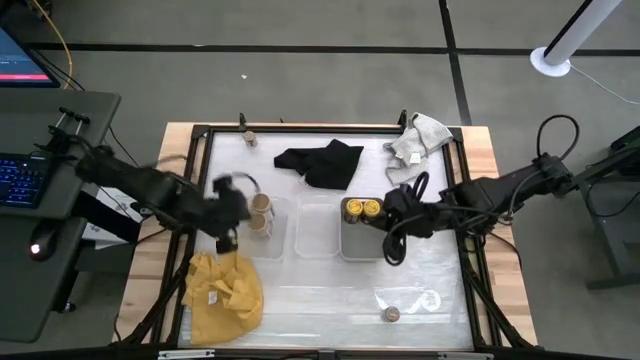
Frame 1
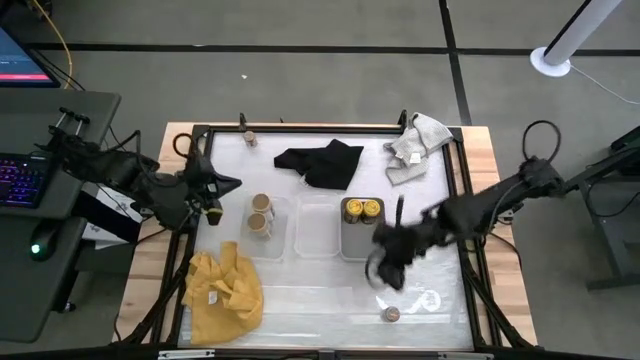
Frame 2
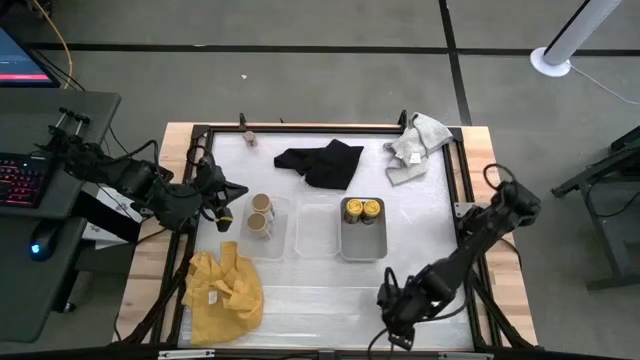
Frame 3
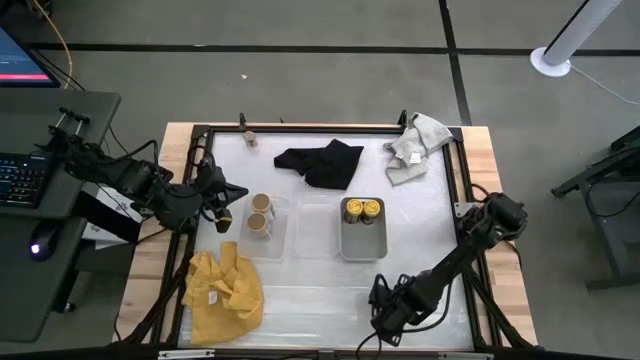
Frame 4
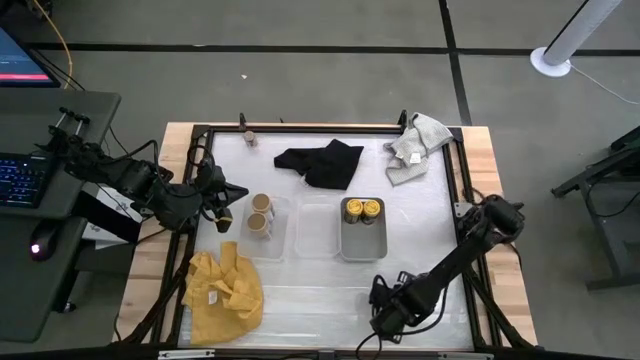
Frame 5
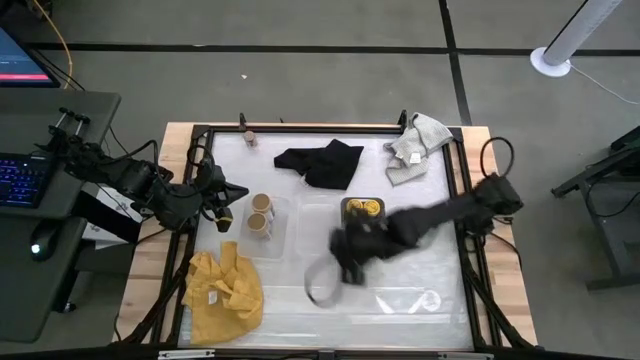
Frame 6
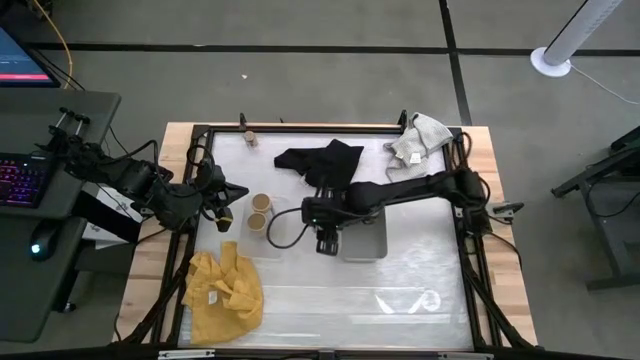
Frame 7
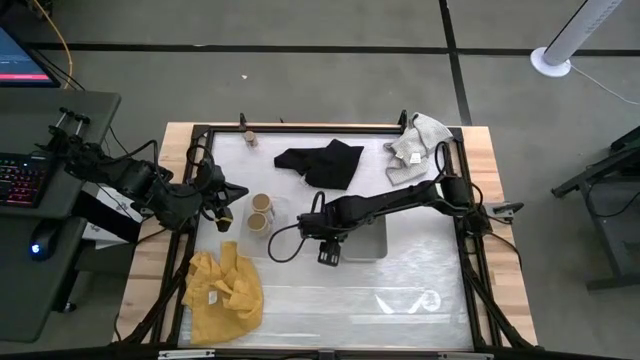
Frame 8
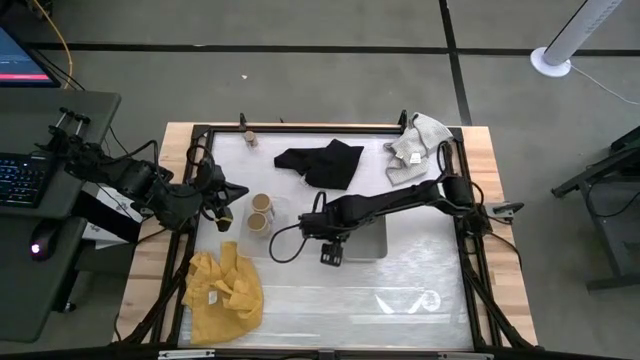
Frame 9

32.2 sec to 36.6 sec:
Task: Sort spices by type
Put the bottom brown seasoning bottle into the right transparent bin

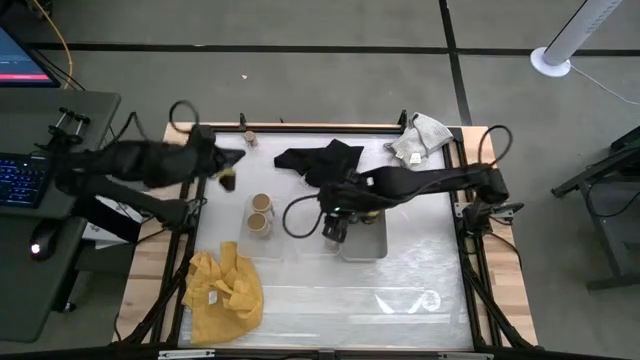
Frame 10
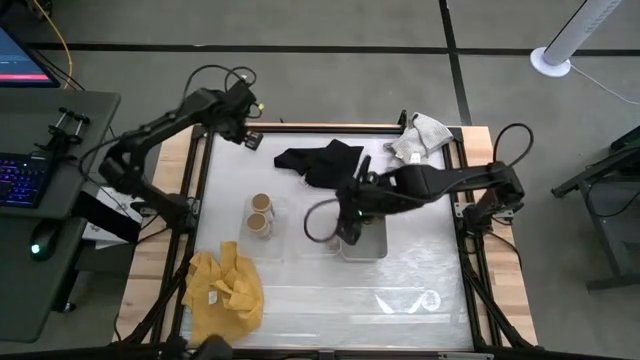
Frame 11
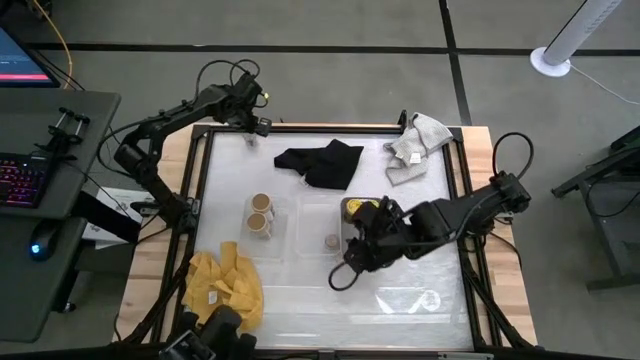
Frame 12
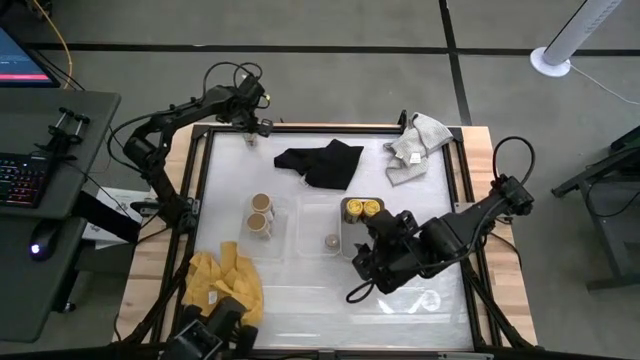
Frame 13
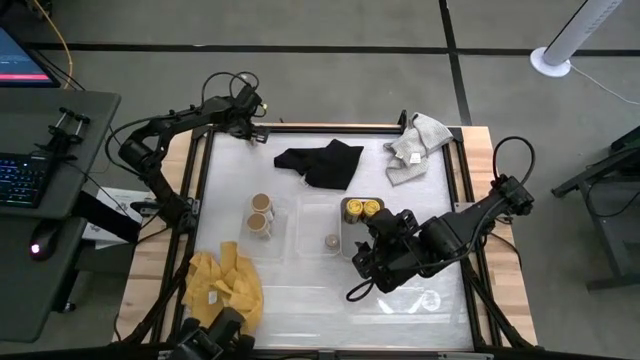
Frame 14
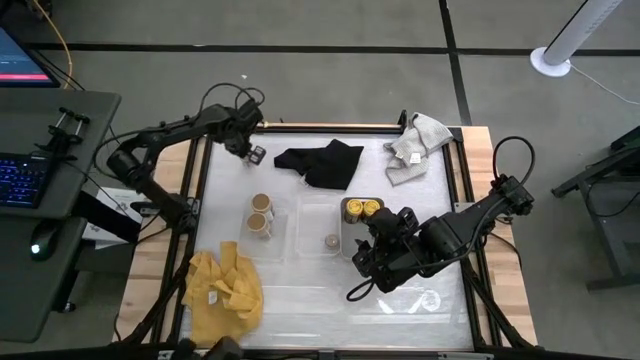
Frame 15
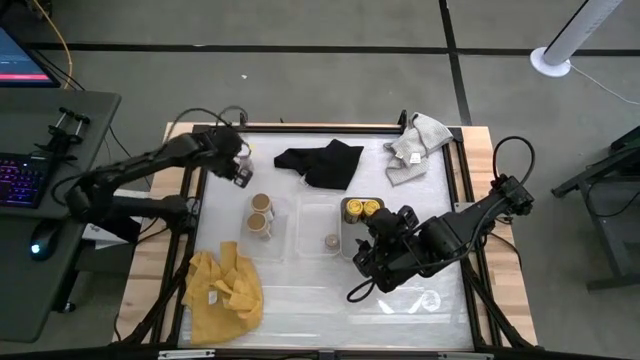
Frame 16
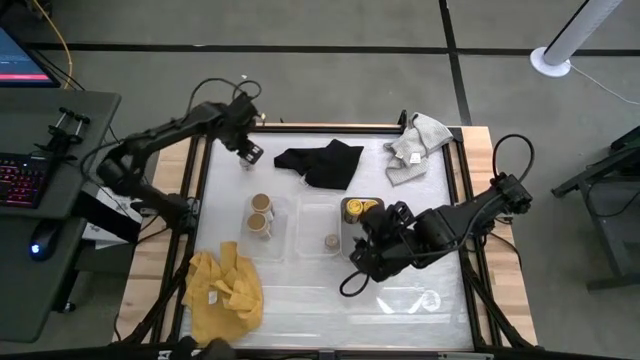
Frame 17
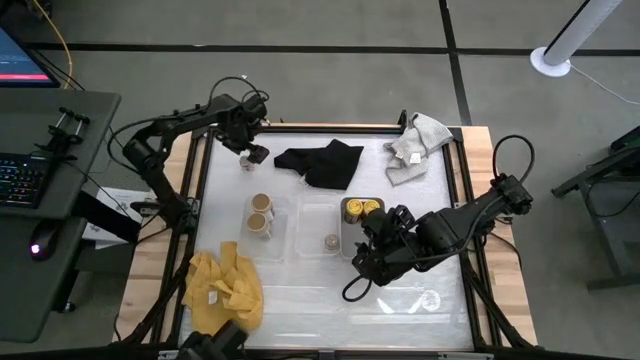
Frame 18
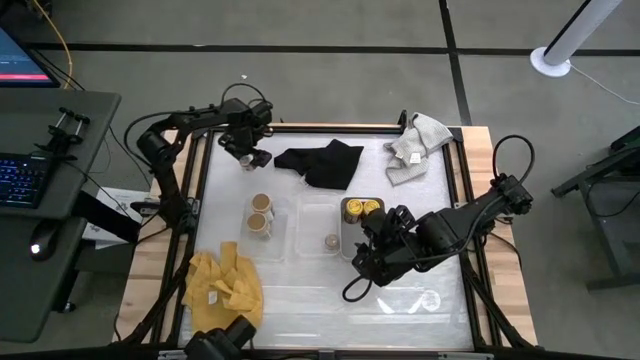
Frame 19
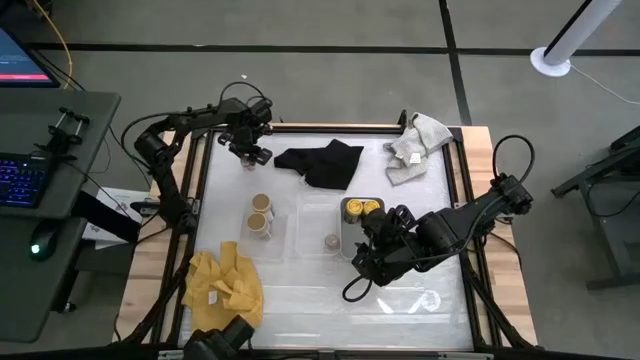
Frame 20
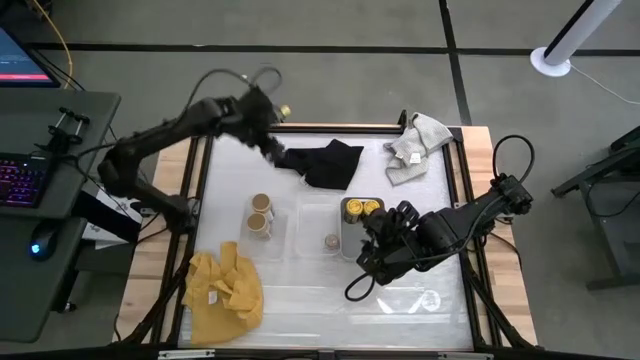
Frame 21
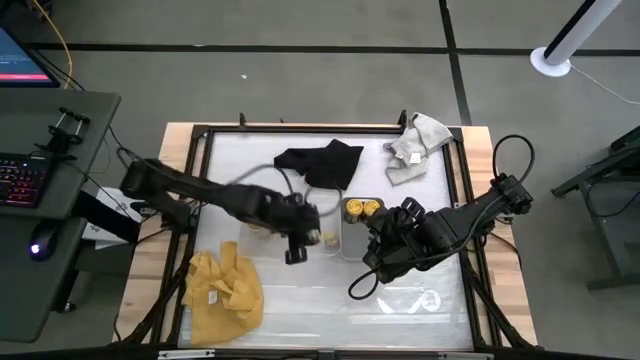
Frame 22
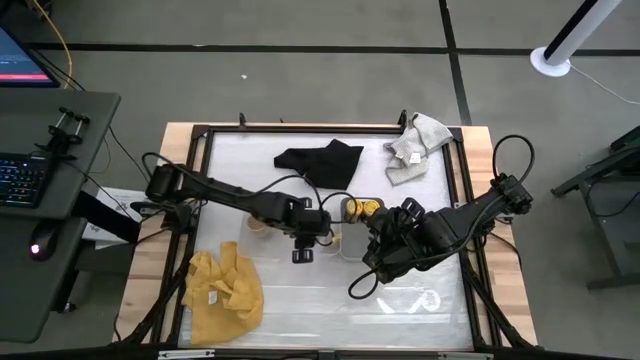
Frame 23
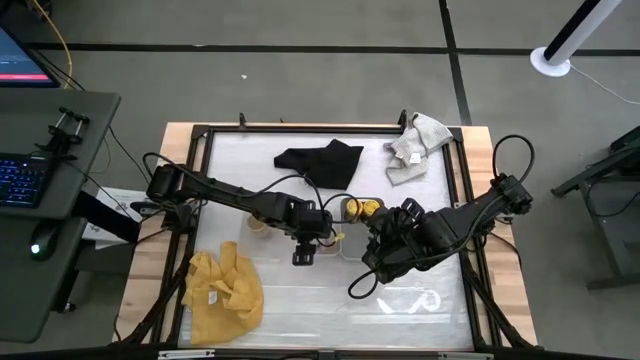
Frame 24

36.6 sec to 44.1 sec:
Put the brown seasoning bottle into the right transparent bin

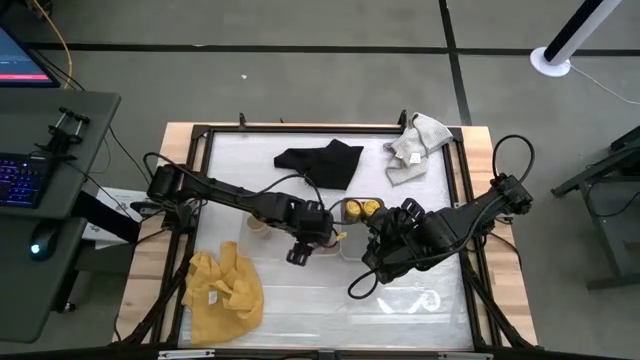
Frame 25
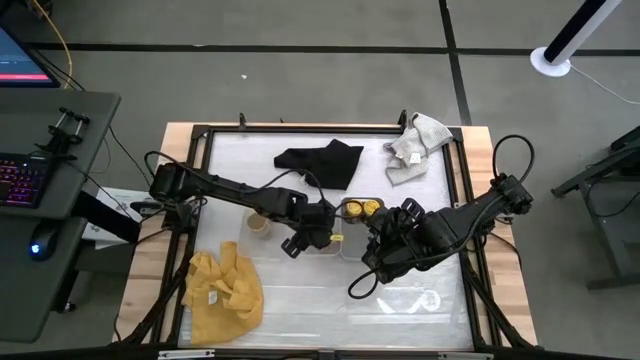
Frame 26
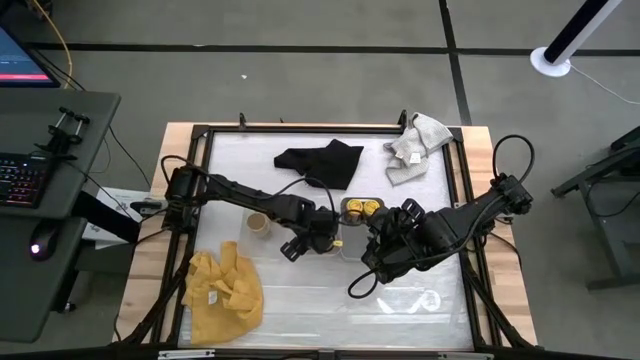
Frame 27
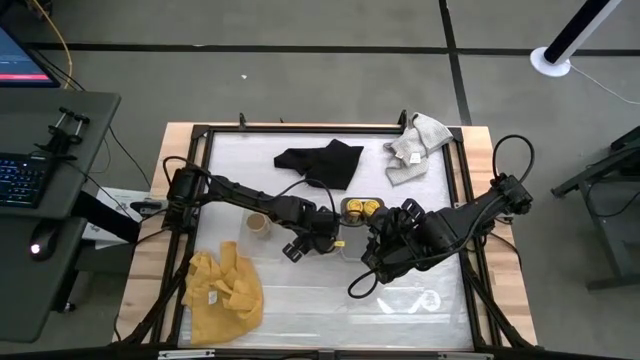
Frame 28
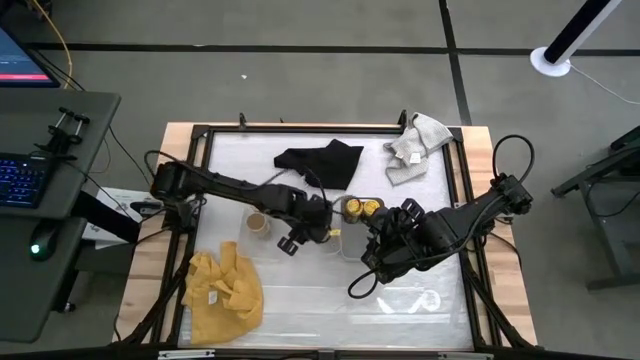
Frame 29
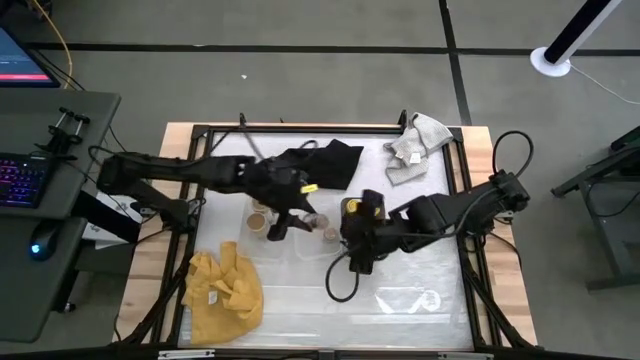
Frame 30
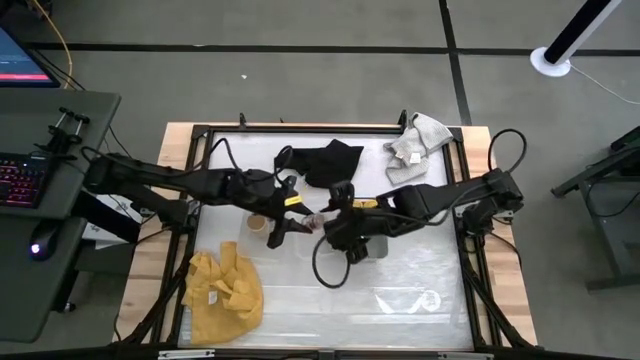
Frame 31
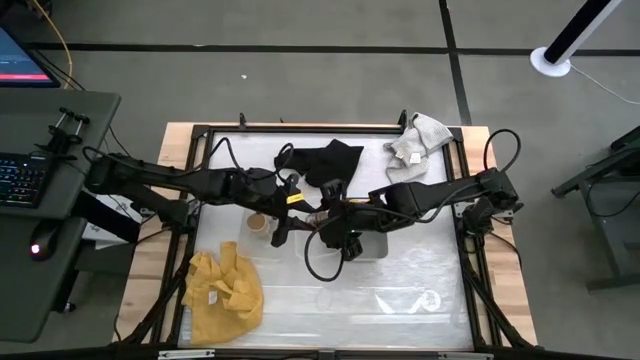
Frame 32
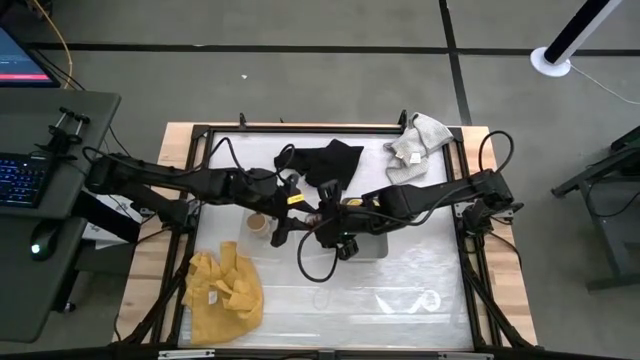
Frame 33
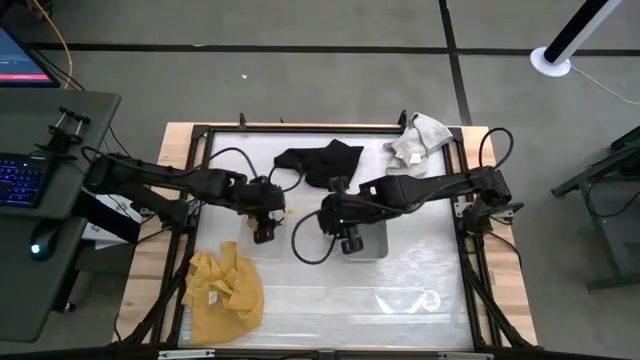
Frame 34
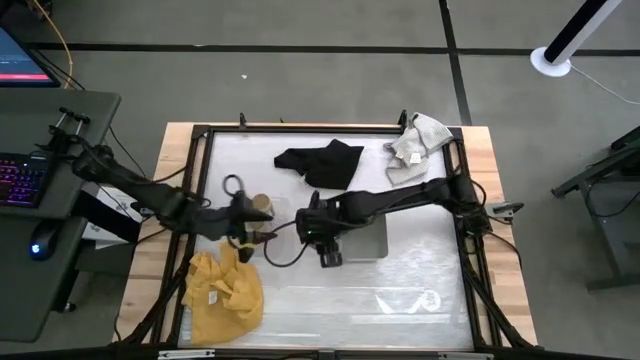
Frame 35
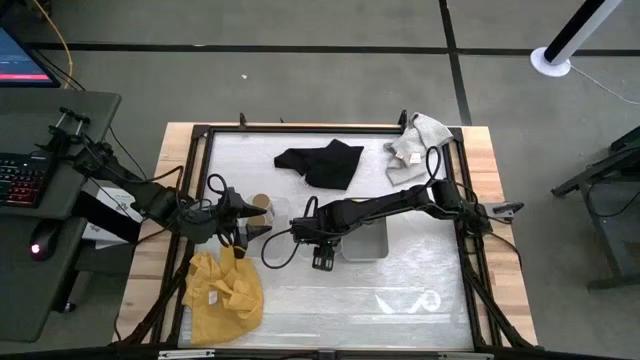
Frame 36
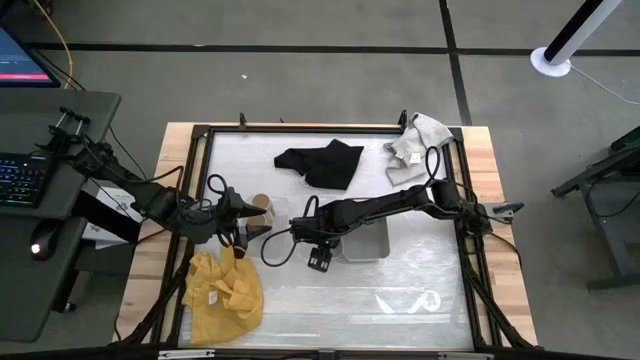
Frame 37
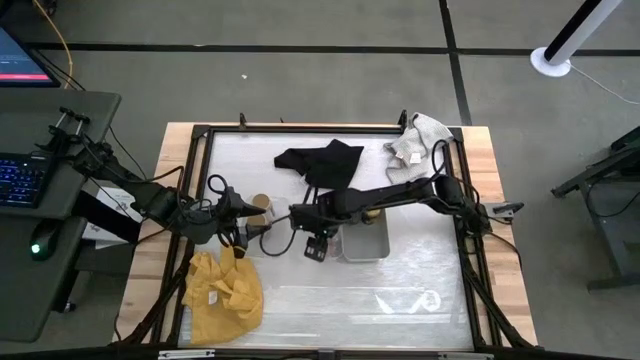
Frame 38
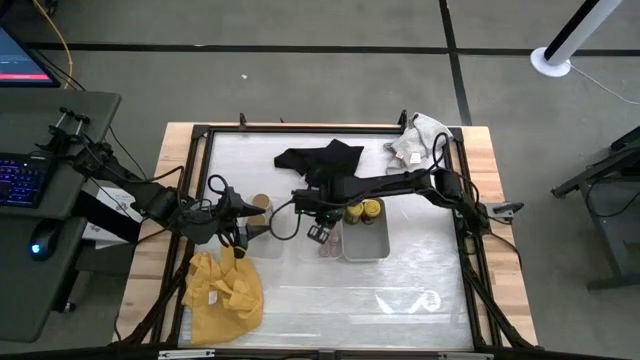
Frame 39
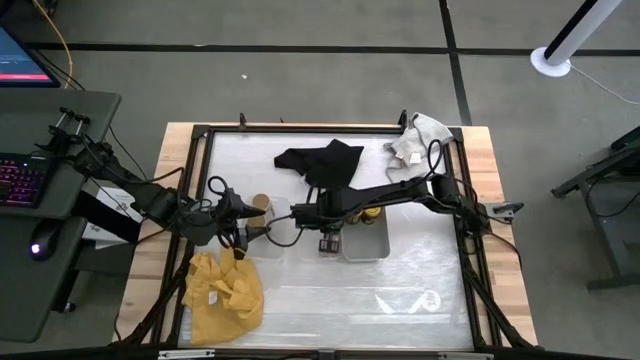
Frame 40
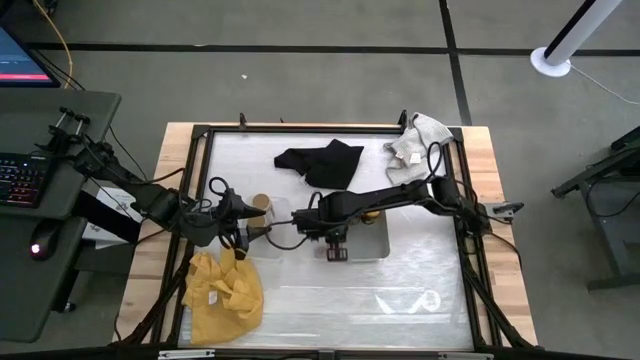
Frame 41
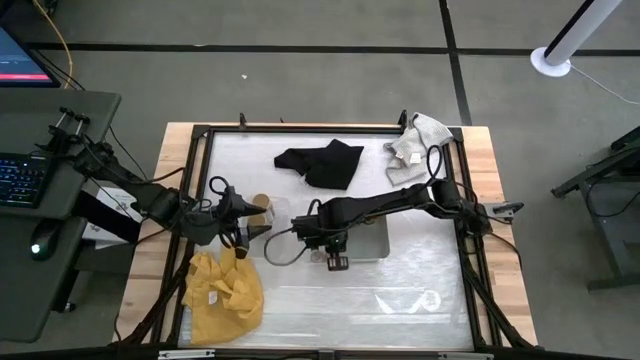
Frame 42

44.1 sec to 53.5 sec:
Put the brown seasoning bottle into the right transparent bin
